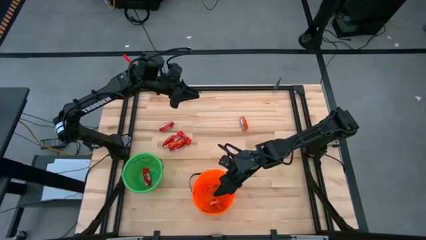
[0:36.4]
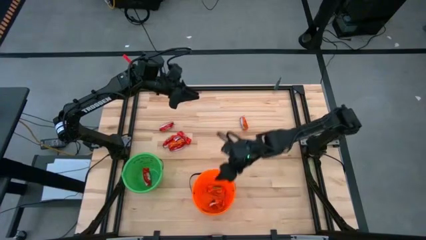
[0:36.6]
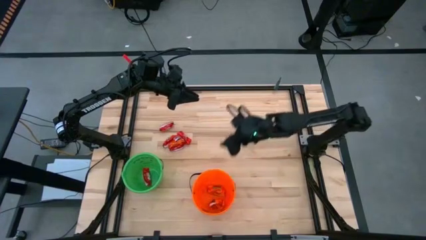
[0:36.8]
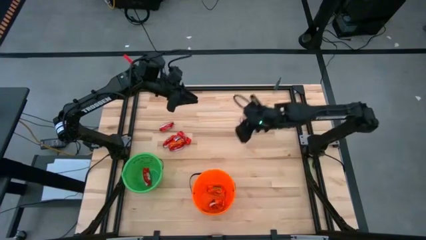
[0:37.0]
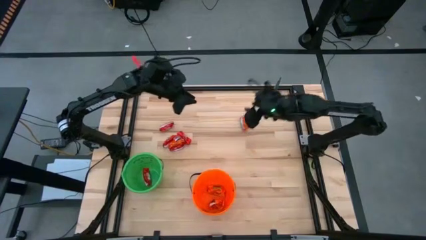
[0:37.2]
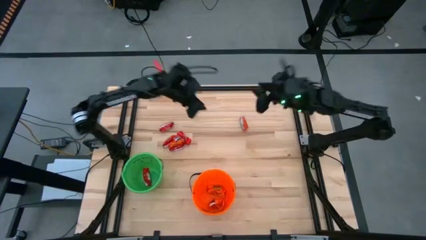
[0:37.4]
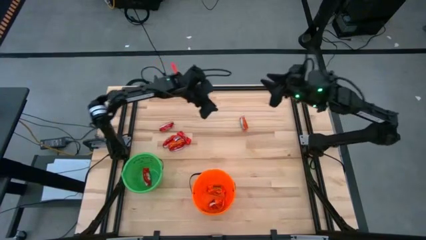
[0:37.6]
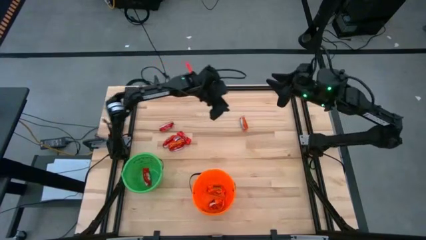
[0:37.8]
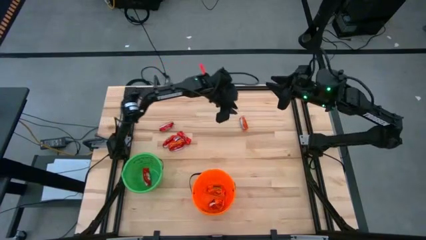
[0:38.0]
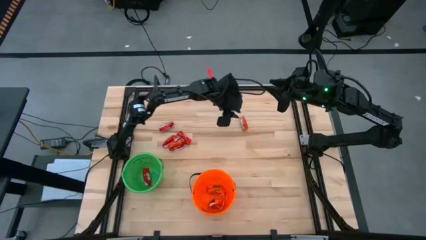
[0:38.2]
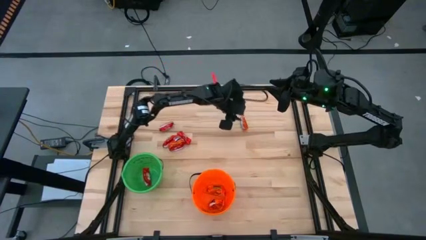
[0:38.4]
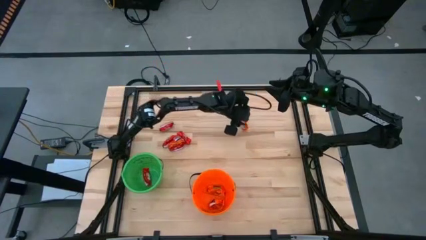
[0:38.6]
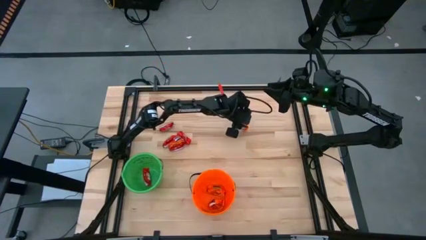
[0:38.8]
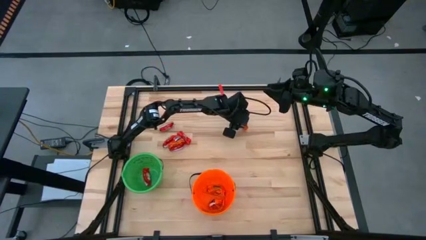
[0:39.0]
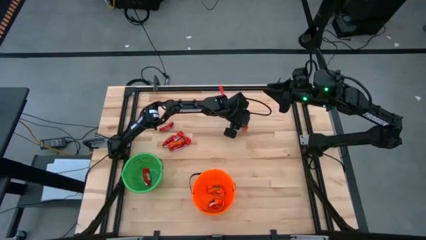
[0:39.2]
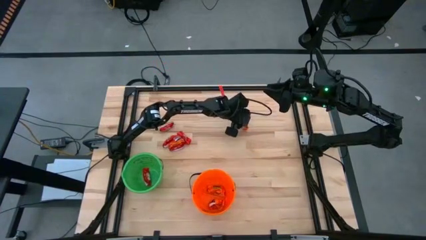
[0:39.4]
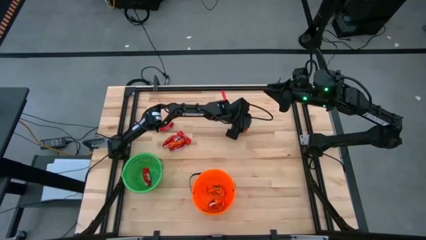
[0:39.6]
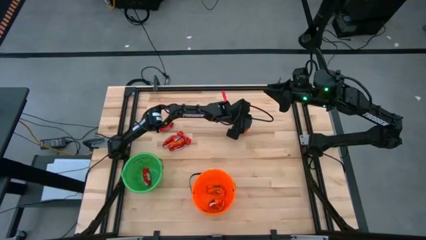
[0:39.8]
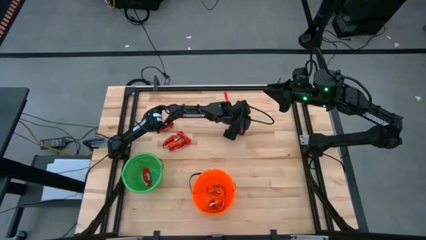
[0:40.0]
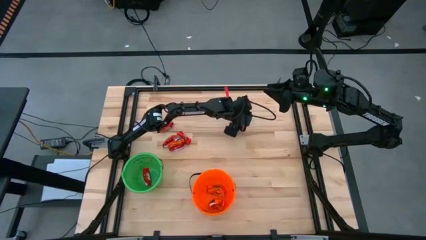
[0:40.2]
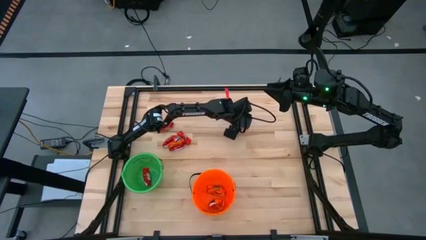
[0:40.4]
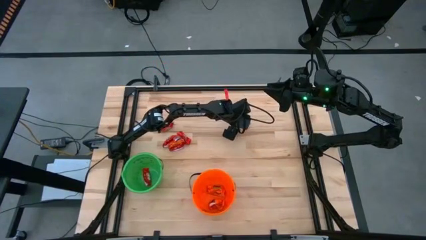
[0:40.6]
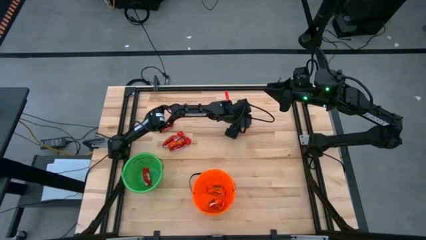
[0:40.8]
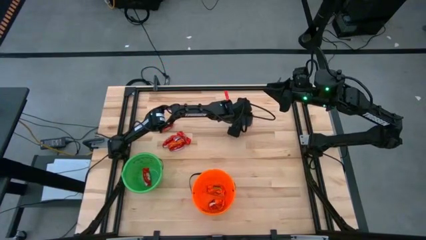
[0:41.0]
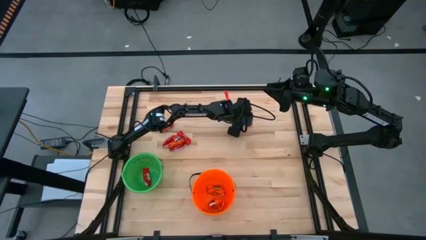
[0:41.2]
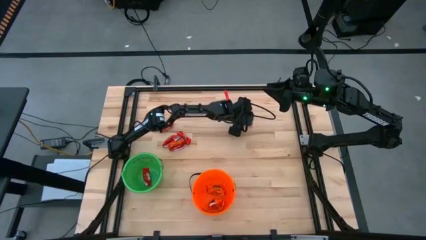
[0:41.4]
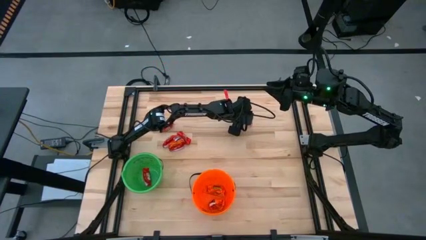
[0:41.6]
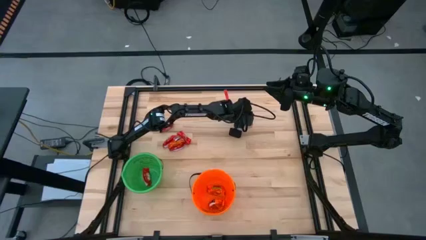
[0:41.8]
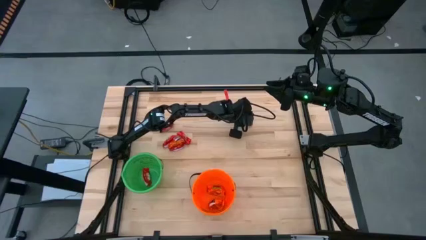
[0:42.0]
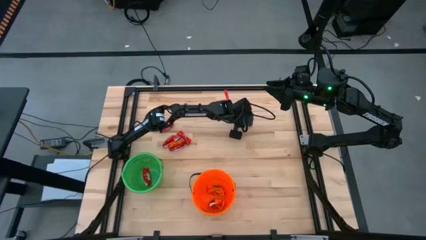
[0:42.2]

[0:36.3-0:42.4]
Put the orange chocolate into the orange bucket

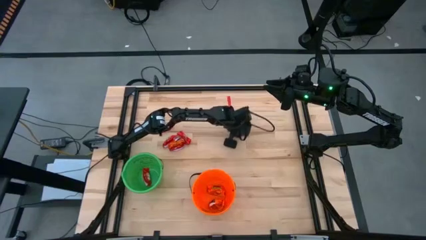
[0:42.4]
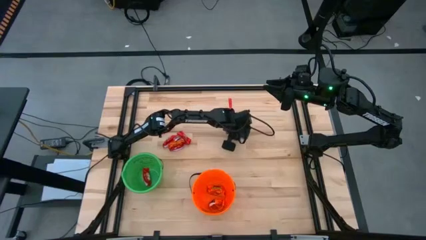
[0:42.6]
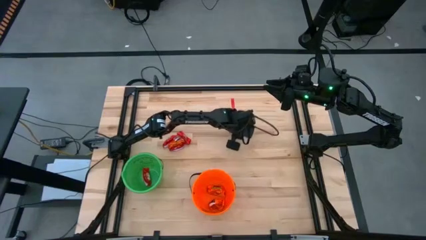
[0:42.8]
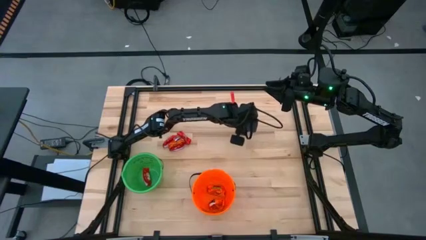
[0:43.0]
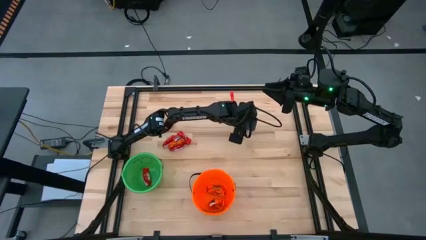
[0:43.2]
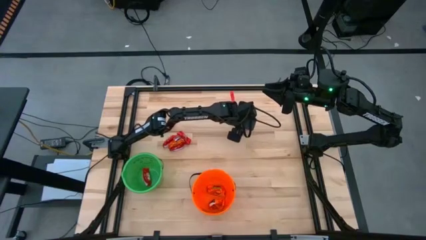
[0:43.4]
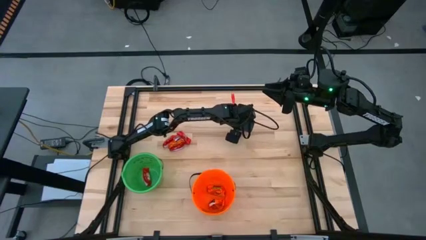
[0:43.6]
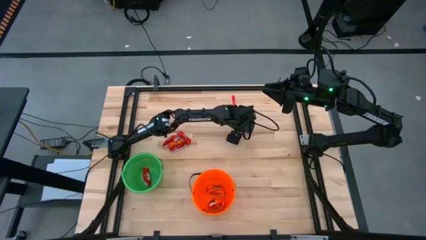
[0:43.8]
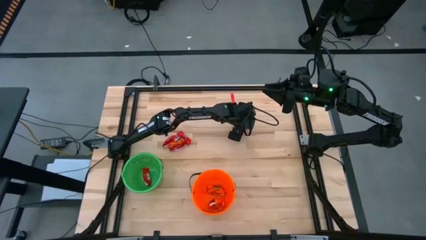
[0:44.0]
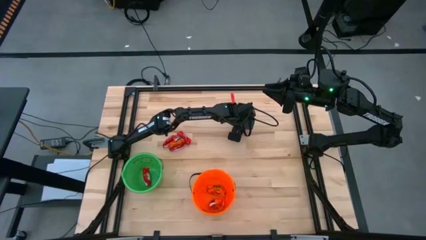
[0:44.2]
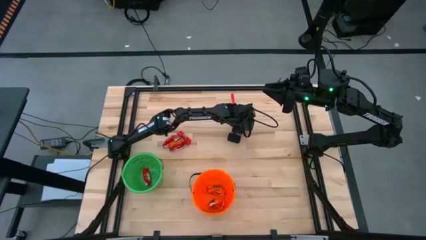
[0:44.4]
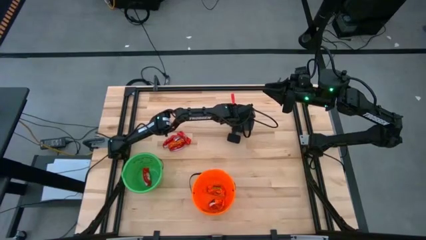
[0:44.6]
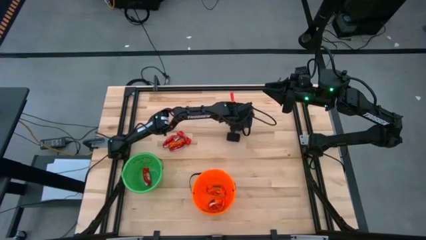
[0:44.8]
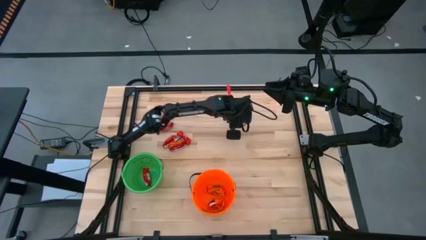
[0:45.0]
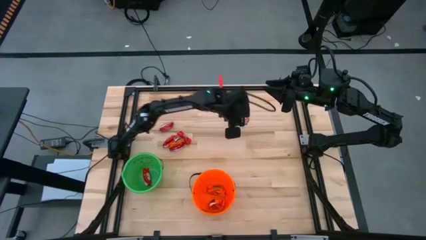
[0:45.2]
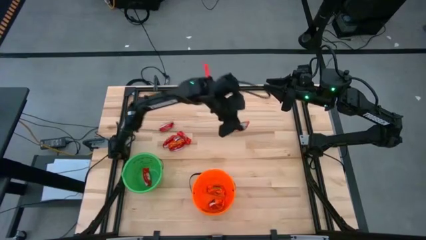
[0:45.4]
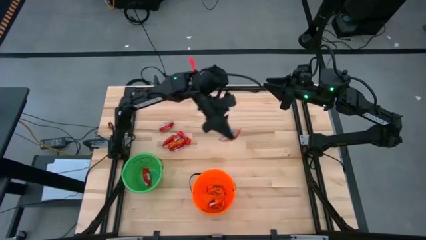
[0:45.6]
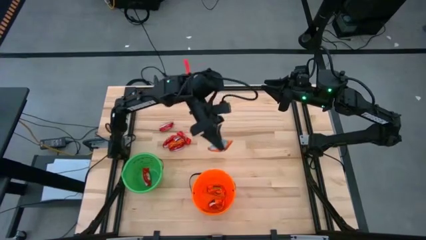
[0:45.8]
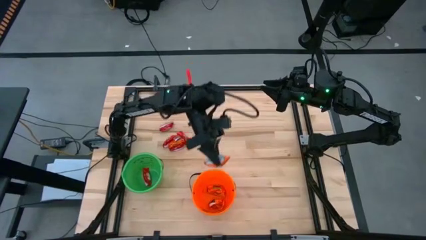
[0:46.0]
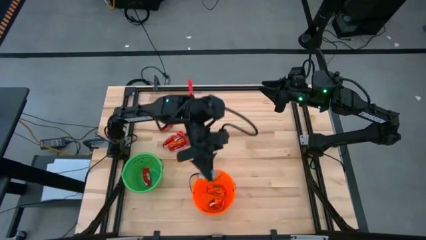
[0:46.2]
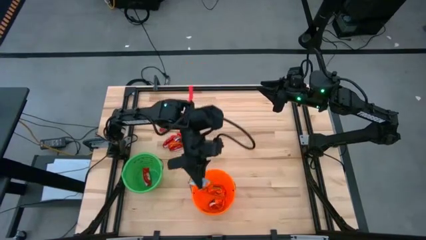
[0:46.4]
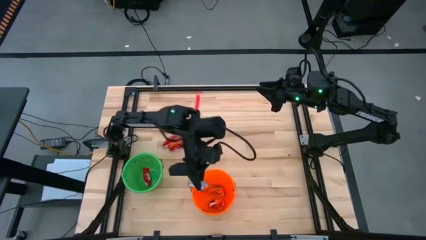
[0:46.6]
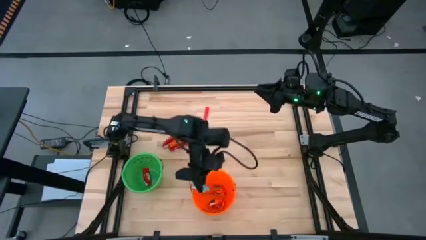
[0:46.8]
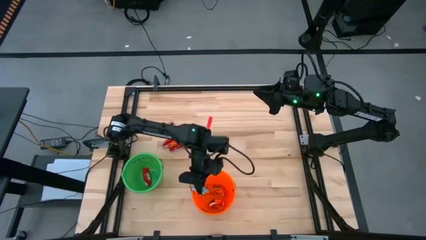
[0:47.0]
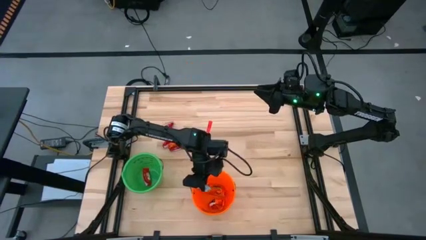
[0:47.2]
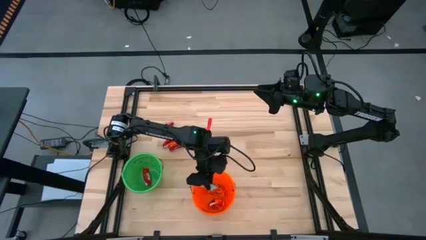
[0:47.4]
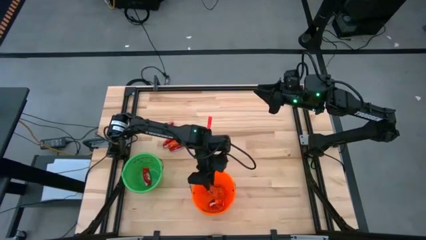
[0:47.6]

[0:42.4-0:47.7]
Put the orange chocolate into the orange bucket

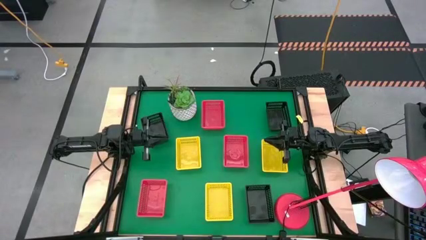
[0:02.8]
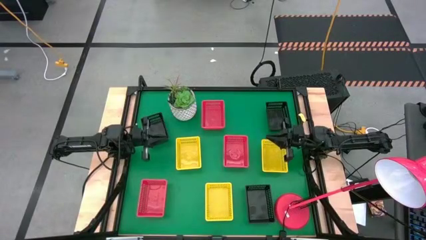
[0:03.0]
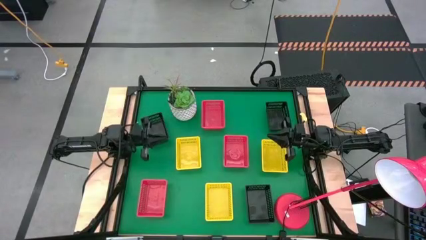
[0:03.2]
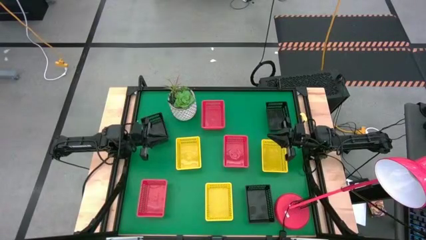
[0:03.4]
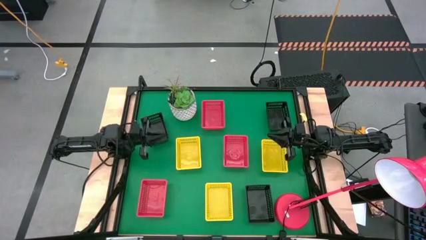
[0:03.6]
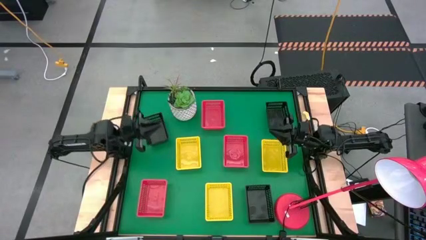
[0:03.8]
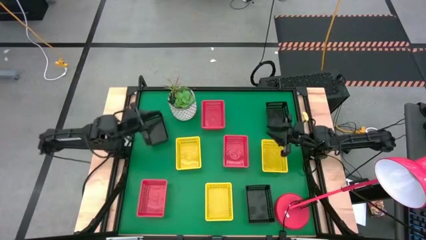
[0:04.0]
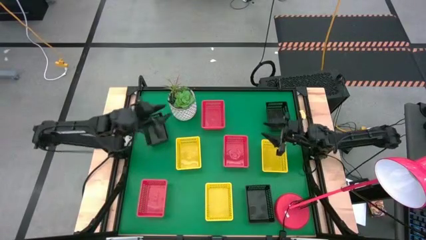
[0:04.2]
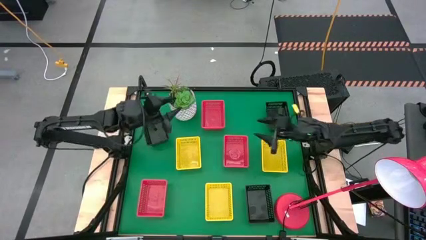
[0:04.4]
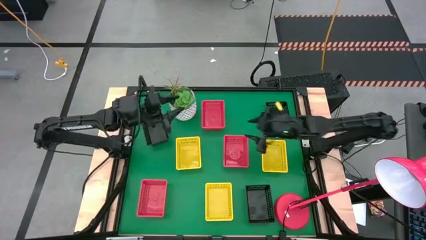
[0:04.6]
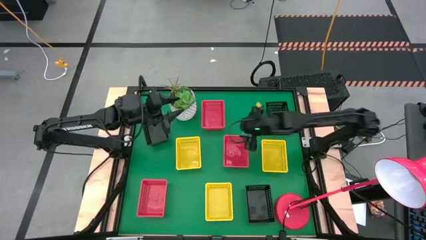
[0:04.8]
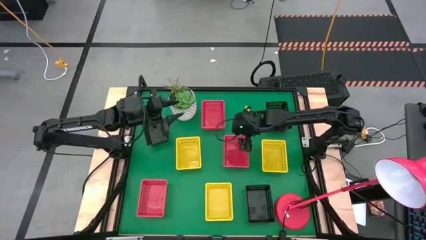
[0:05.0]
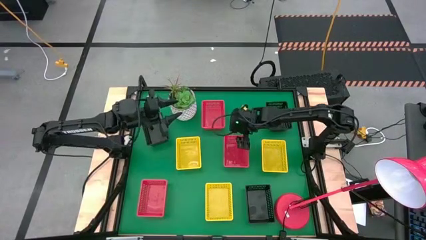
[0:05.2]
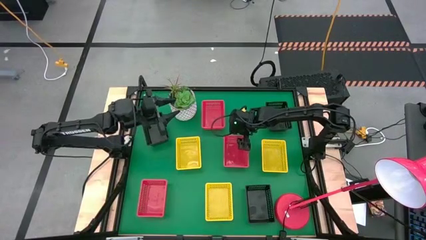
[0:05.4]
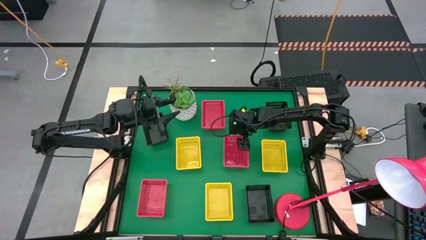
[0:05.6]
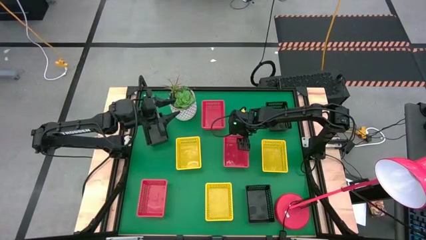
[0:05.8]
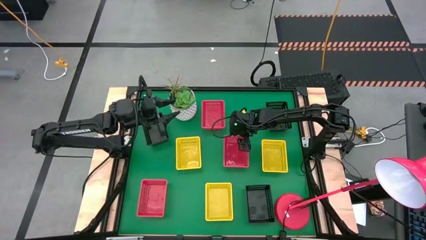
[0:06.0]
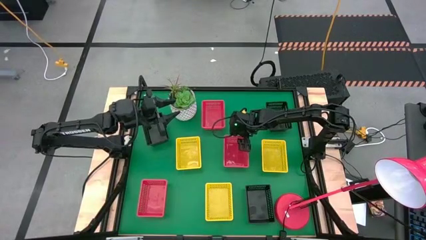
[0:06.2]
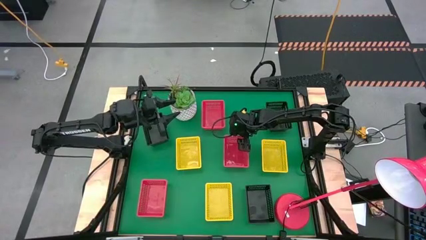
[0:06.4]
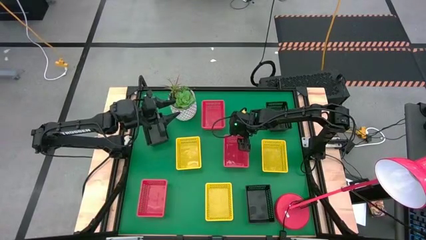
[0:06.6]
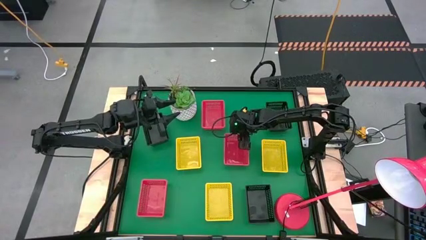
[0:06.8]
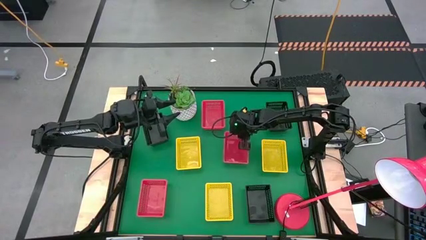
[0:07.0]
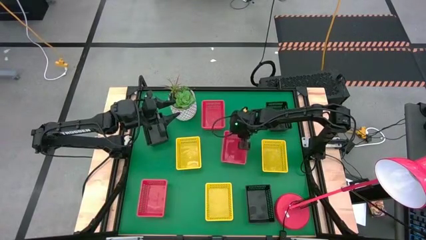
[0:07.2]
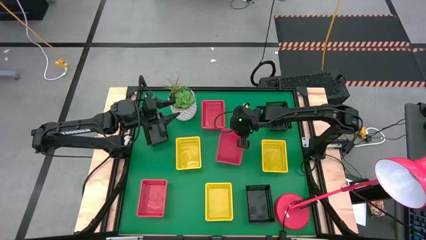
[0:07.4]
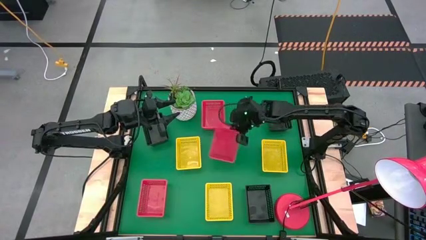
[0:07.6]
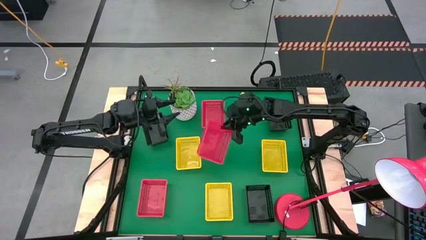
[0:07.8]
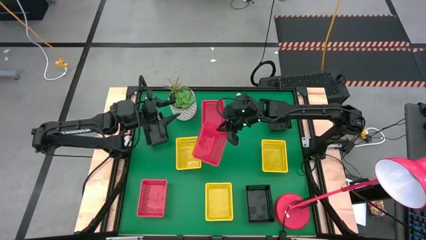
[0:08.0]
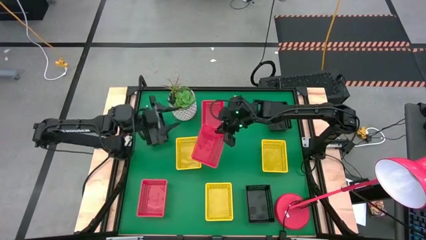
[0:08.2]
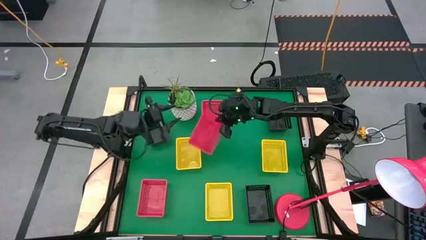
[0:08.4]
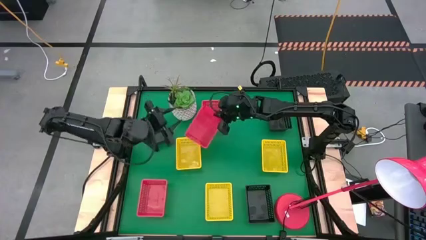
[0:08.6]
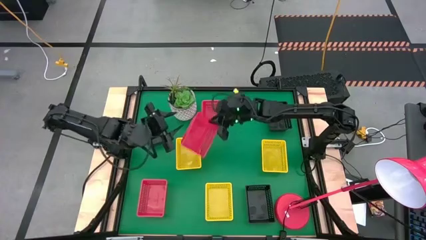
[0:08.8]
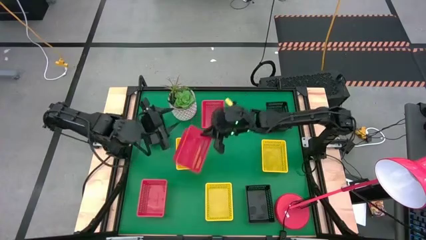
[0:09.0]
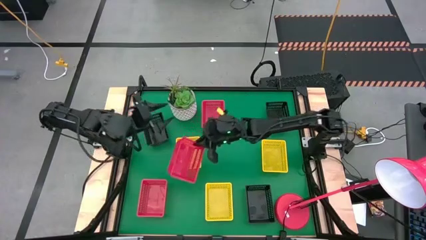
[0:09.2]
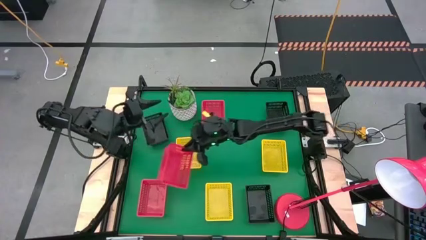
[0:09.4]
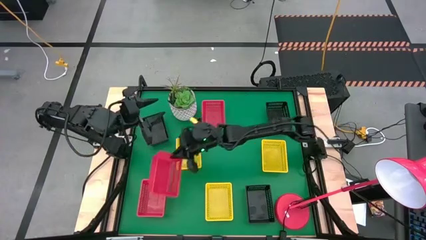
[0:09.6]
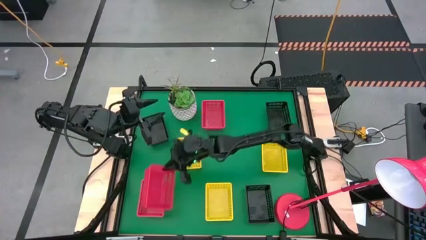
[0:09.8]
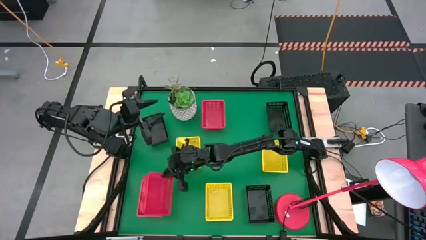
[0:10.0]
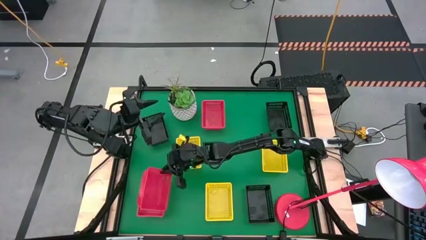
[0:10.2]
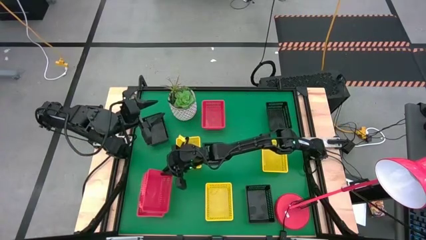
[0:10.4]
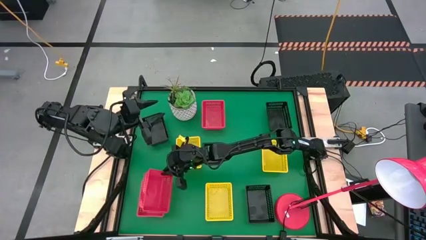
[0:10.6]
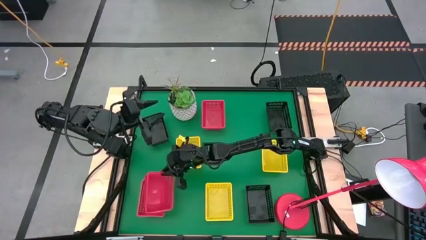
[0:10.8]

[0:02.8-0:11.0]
Stack the middle right red bin on top of the bottom left red bin
